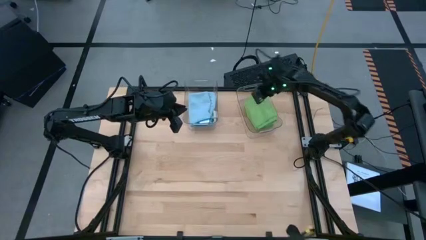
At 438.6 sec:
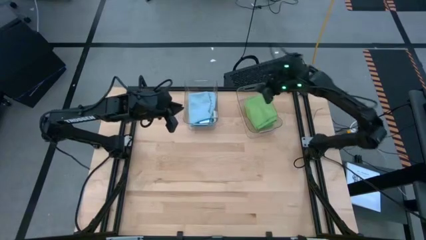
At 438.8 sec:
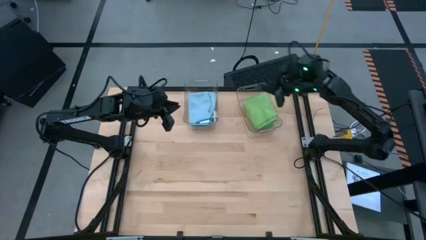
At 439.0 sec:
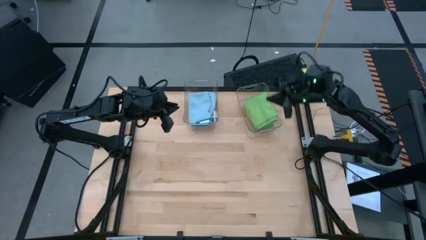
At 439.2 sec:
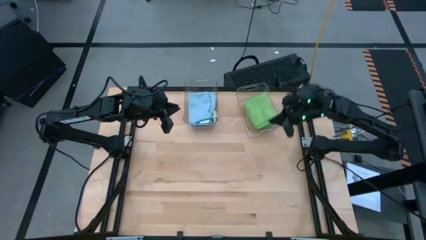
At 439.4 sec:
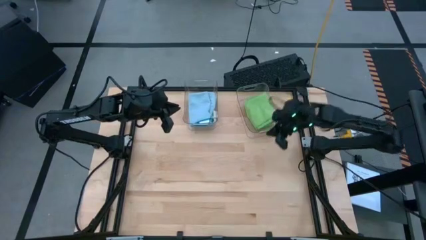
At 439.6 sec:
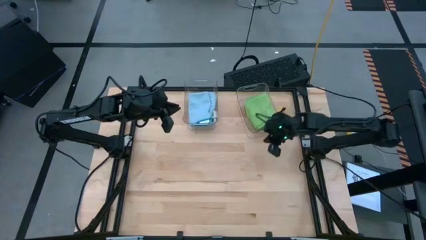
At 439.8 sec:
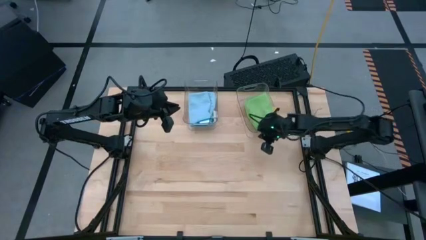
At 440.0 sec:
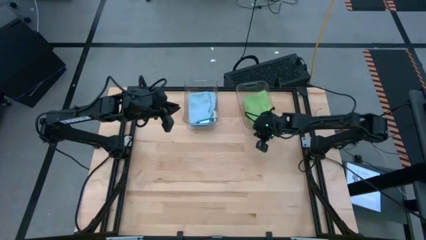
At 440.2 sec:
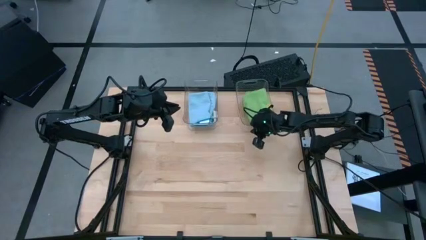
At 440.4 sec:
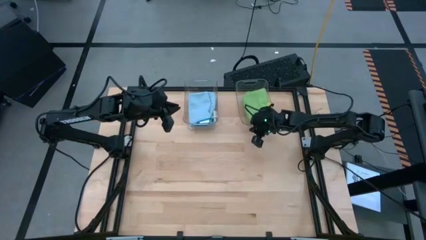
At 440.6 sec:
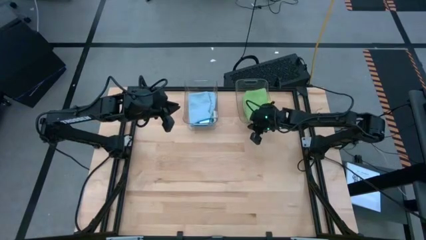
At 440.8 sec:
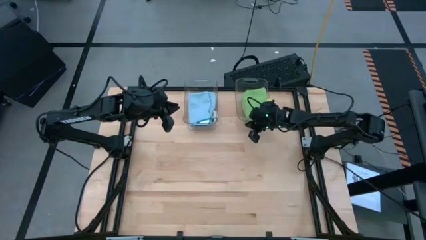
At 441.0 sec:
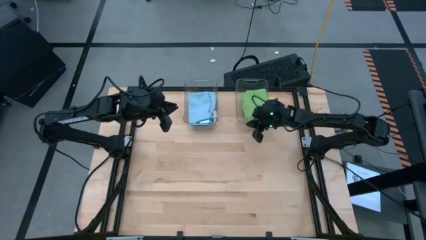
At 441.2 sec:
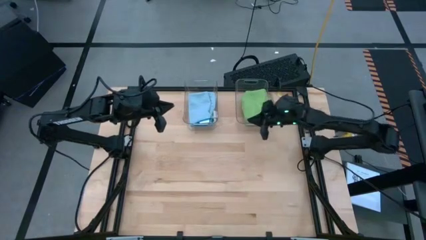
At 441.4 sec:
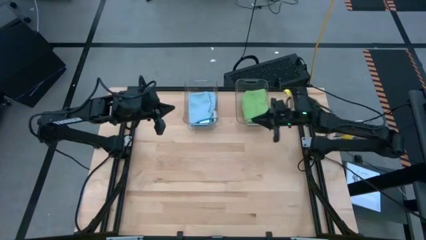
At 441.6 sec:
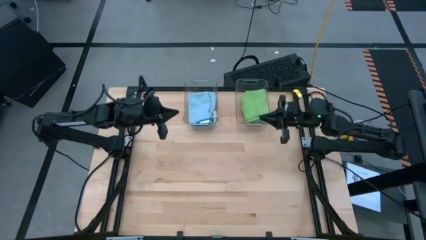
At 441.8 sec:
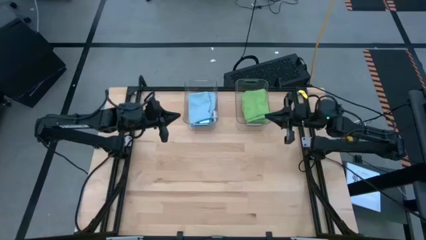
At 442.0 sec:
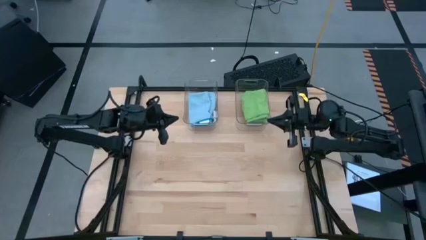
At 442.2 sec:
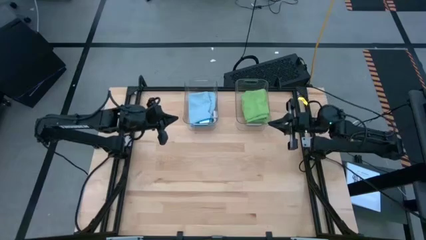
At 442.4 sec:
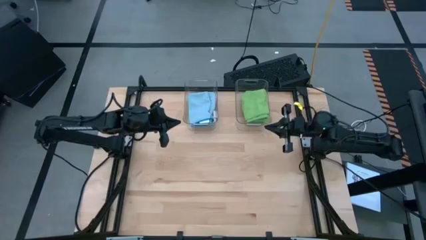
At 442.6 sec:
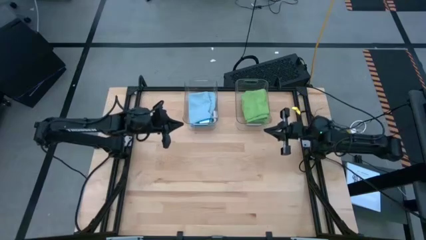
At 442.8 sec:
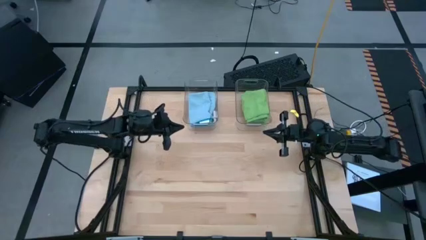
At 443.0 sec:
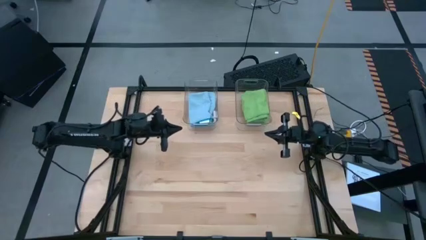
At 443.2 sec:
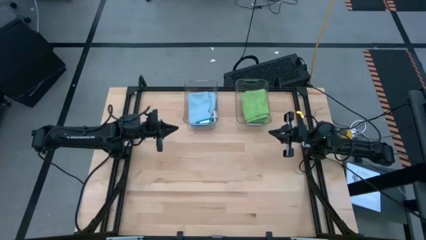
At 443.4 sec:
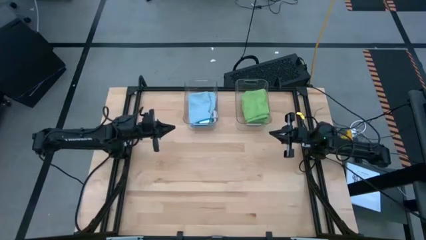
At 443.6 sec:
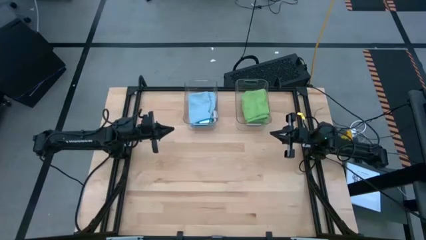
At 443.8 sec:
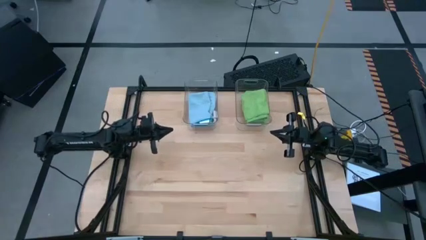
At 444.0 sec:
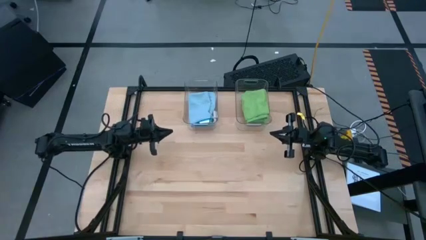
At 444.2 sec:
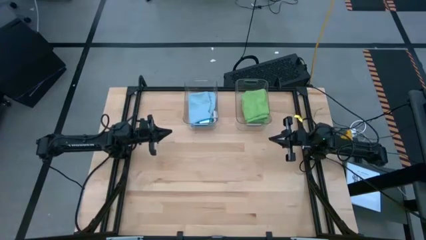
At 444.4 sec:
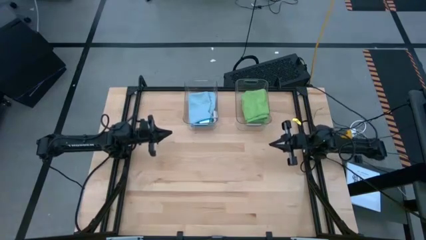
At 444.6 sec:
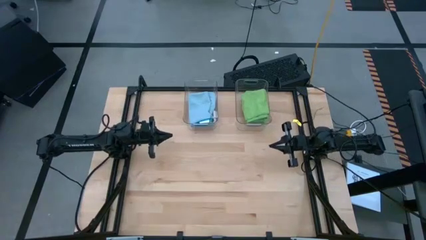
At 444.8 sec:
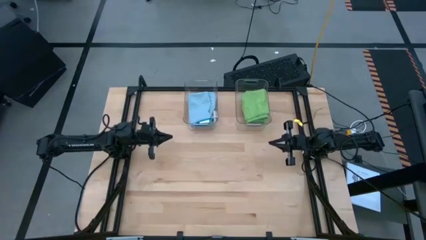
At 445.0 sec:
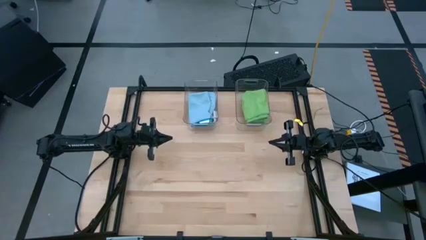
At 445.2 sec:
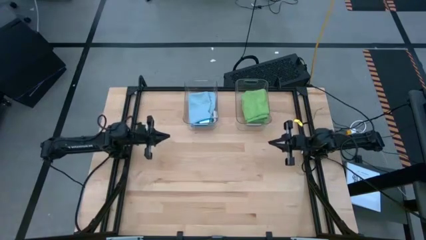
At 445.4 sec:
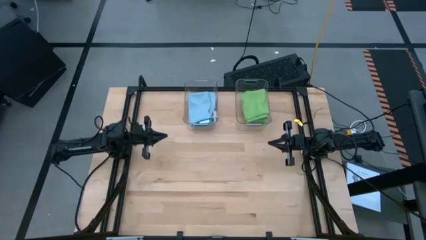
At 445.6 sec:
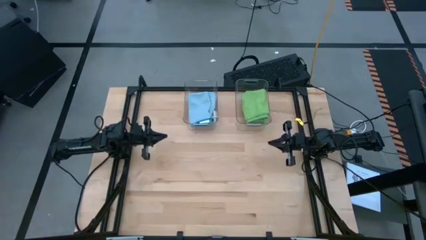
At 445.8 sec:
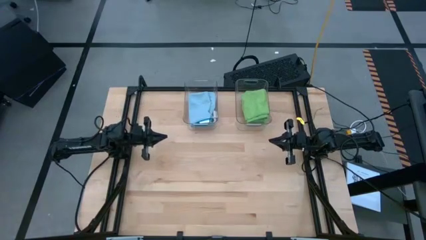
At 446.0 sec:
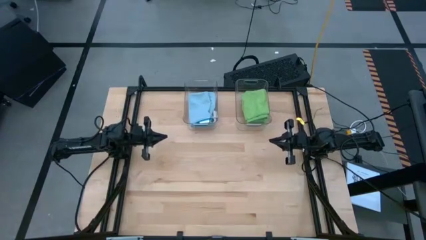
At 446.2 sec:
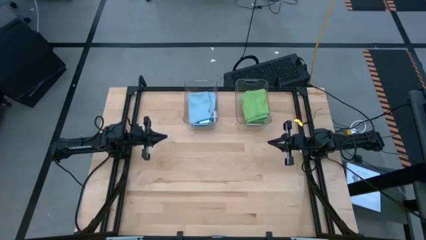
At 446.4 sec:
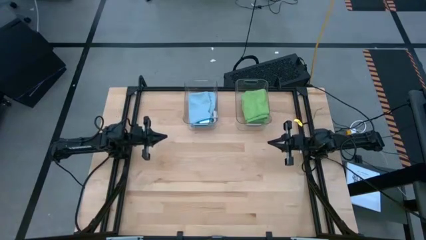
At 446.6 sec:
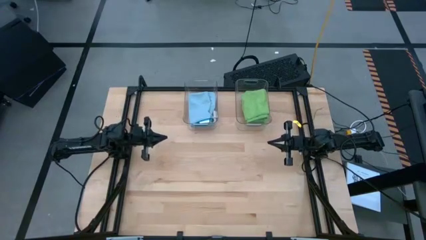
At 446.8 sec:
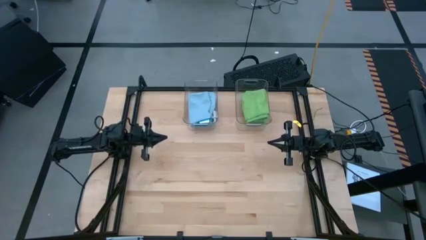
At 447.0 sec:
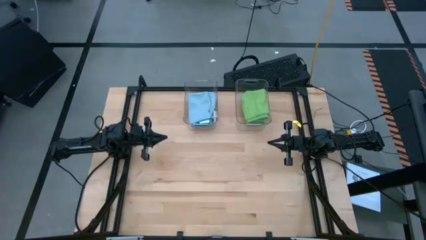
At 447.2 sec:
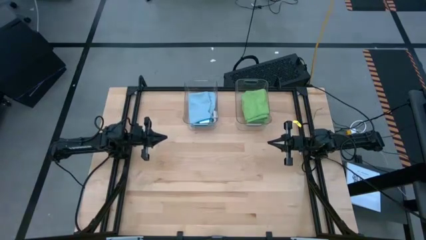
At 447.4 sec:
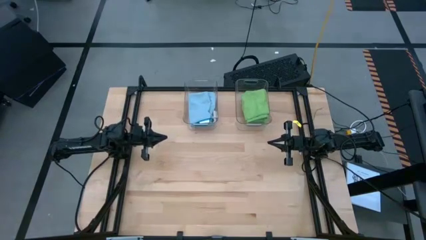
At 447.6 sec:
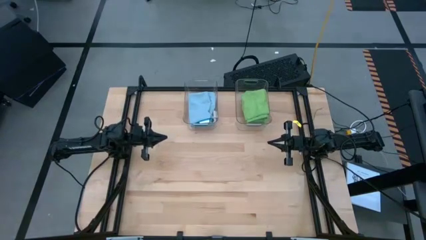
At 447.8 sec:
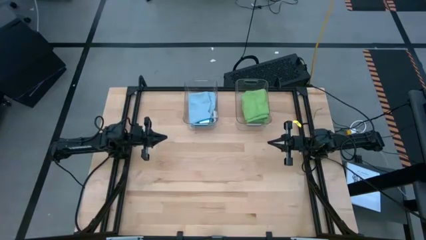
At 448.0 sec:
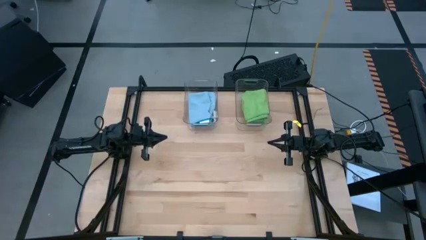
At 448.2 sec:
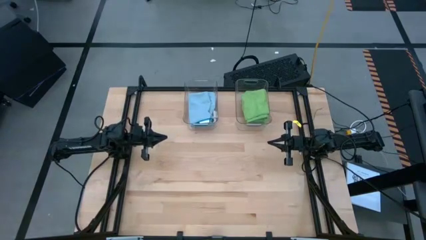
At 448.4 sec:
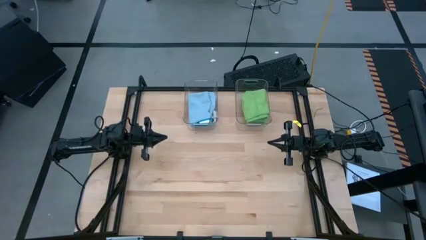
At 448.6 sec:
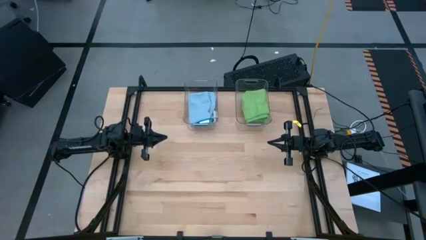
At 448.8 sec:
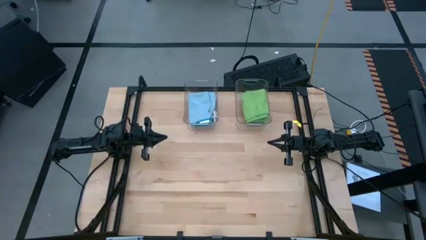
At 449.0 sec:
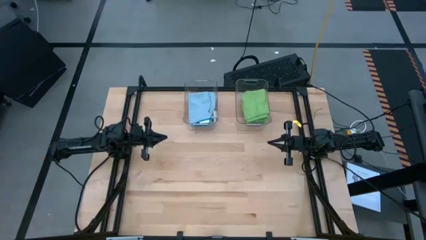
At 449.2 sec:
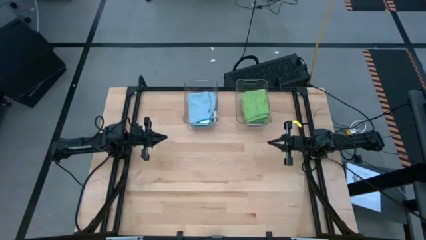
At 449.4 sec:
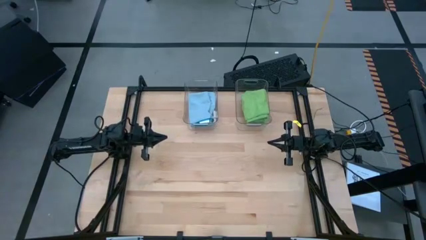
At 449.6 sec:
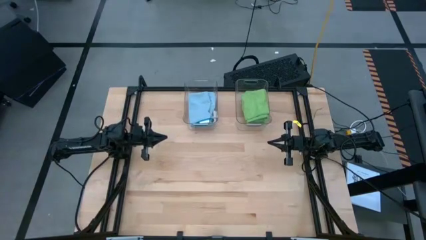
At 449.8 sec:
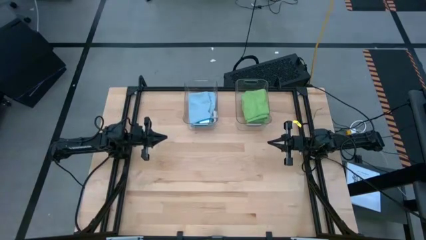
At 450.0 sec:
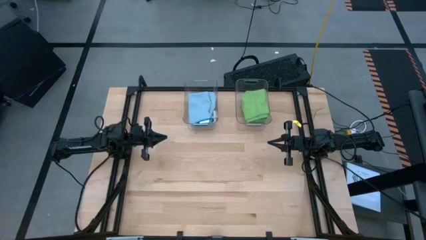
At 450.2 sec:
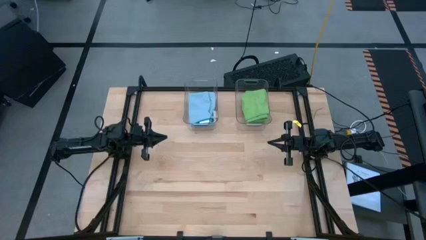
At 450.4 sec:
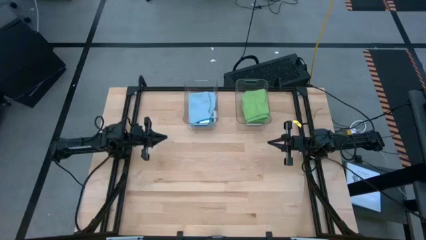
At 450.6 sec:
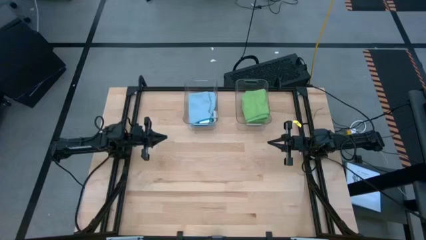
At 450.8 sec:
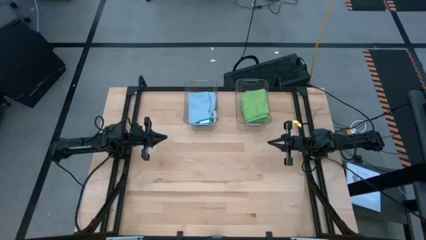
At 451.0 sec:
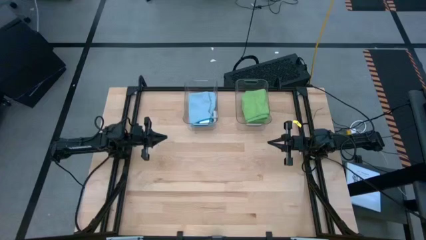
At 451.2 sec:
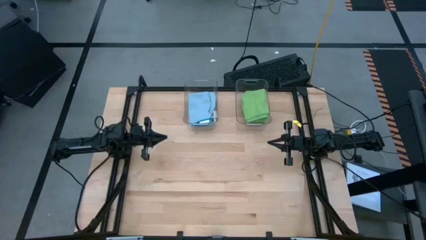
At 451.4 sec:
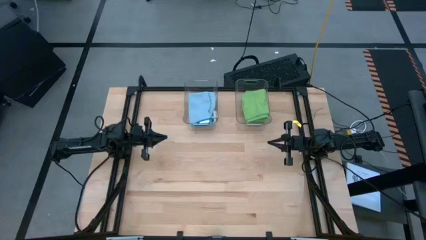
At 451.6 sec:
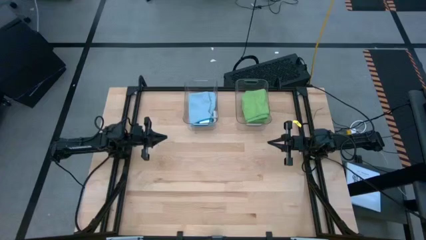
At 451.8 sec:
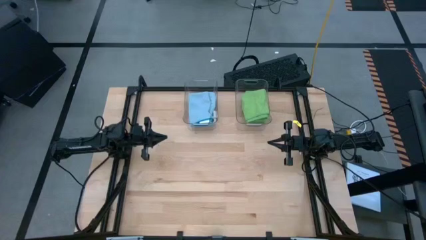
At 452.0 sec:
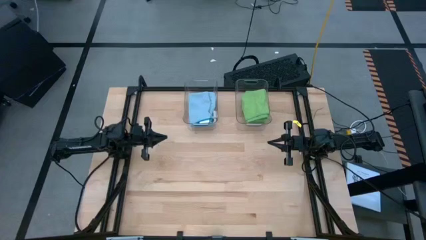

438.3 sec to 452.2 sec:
Task: Fold microfiber towels
Return to Home Position
